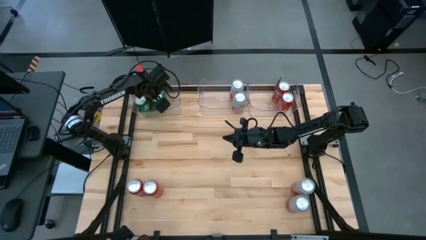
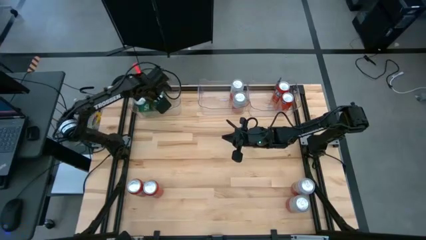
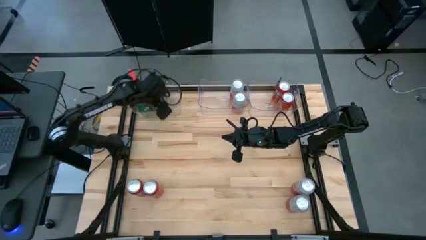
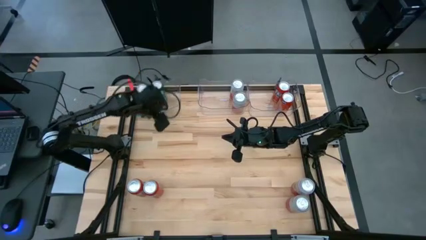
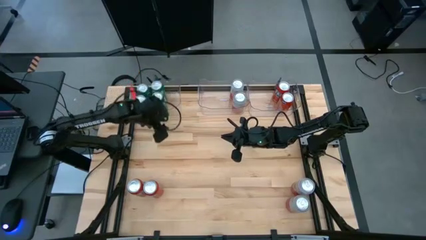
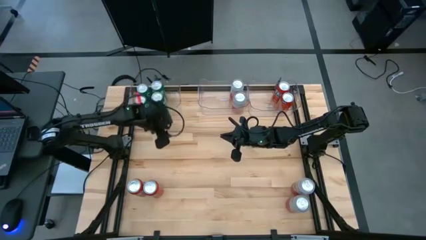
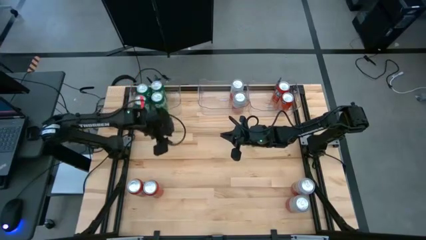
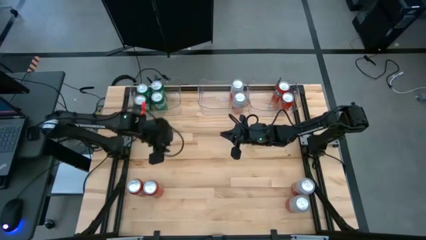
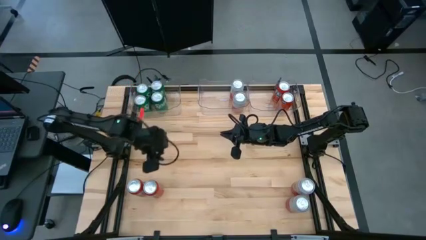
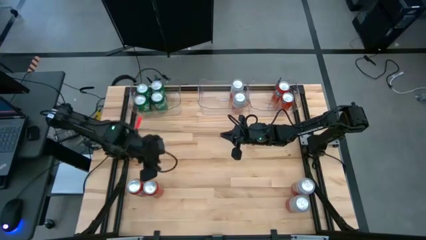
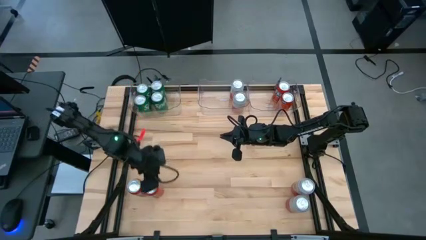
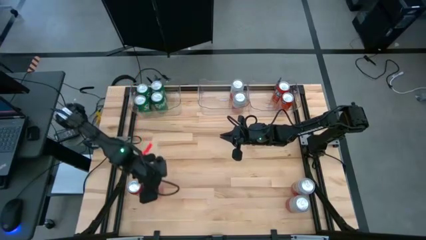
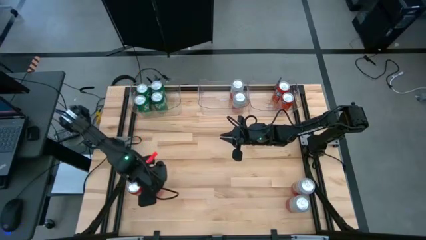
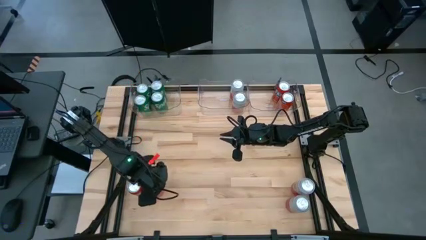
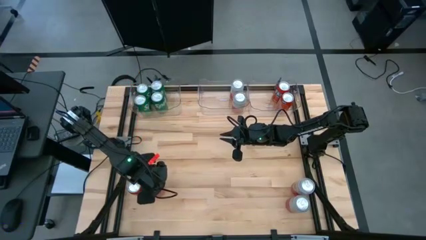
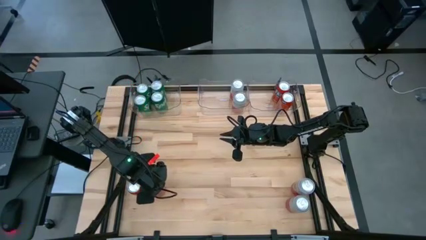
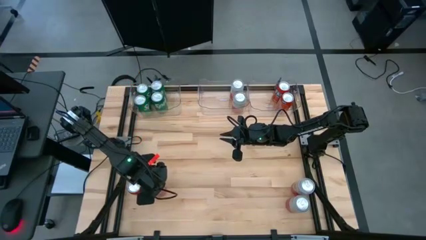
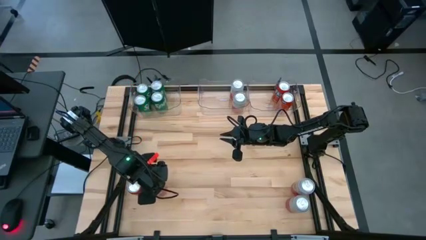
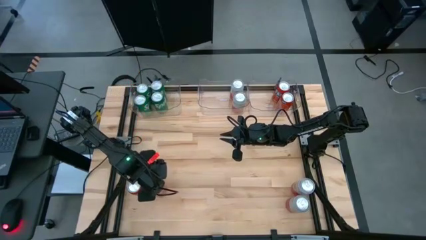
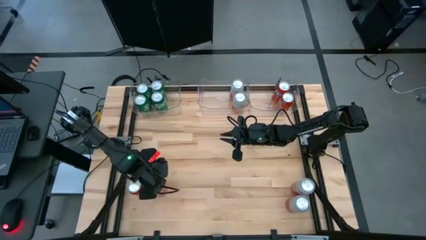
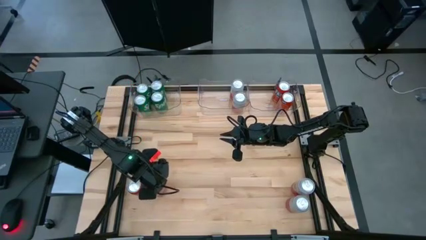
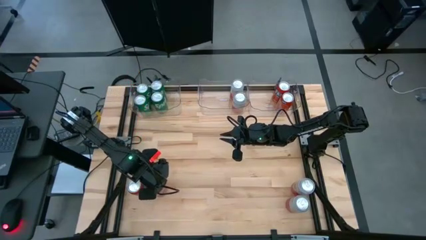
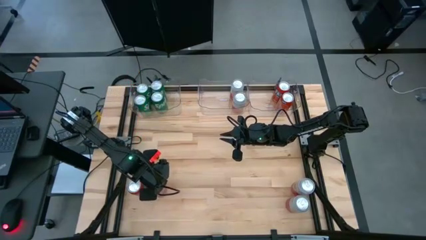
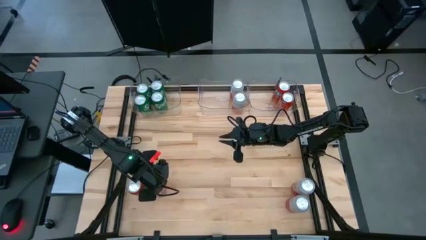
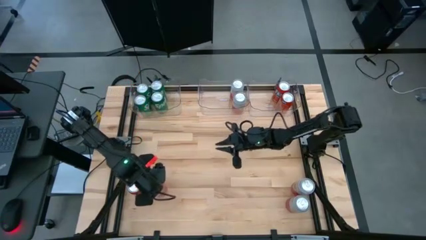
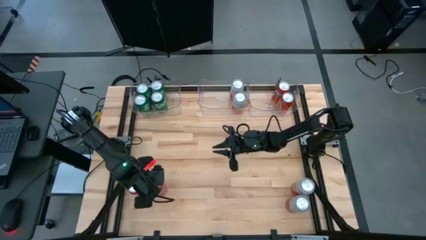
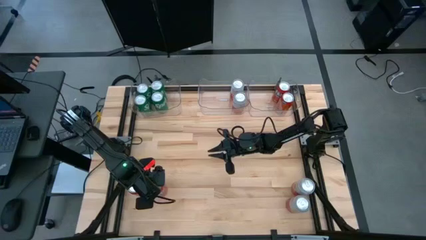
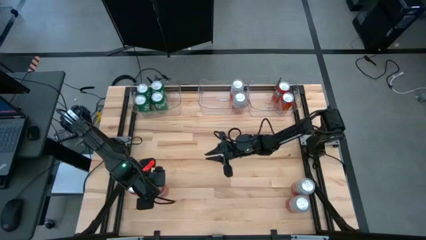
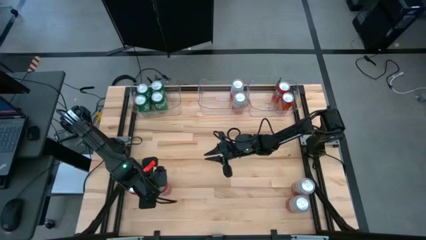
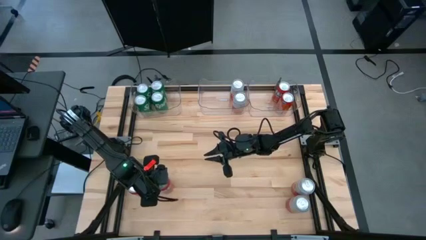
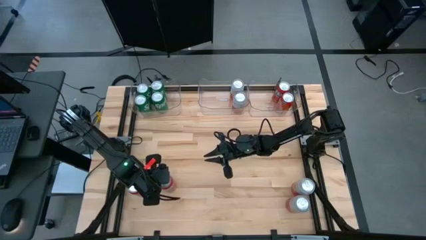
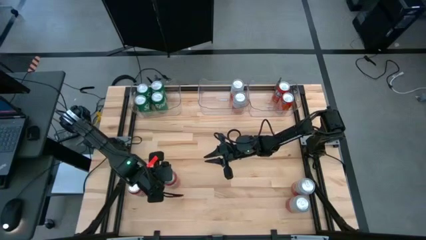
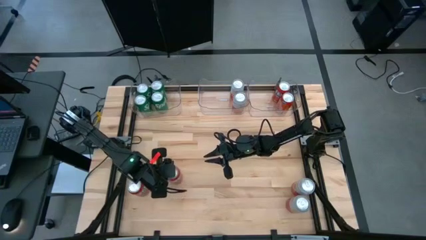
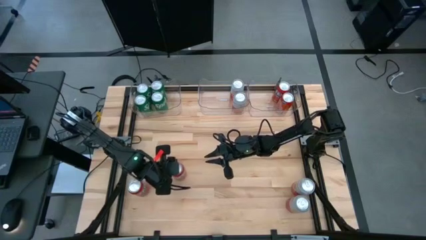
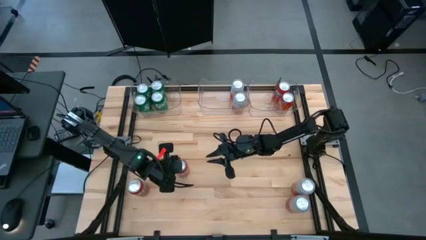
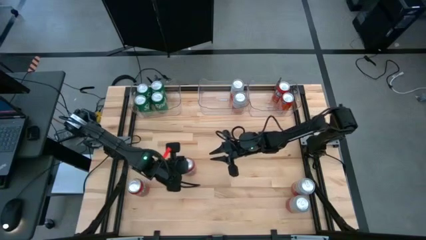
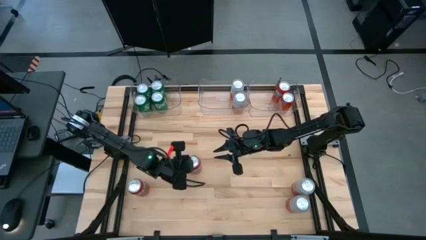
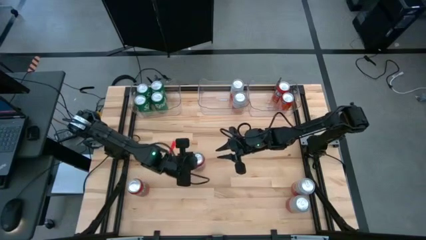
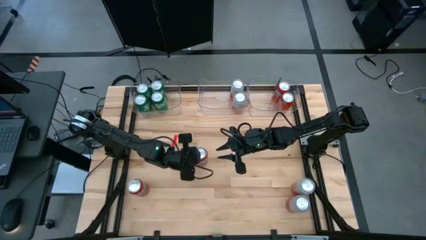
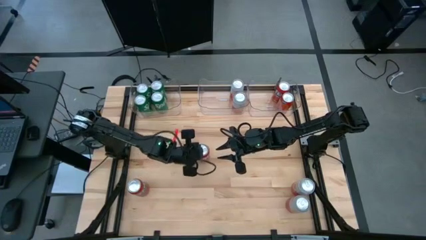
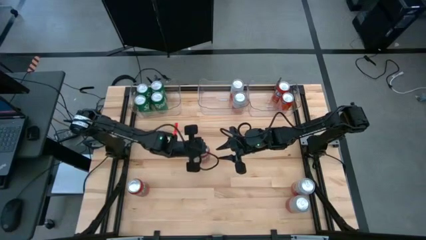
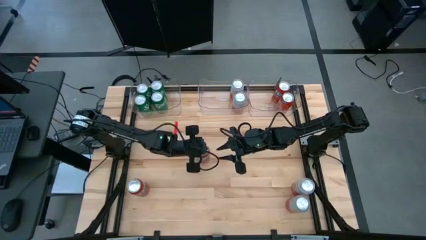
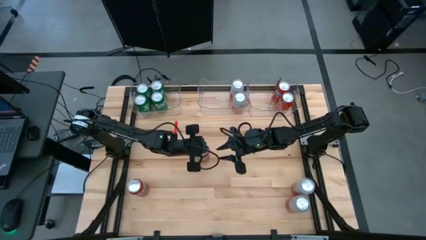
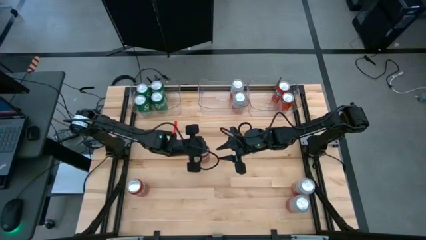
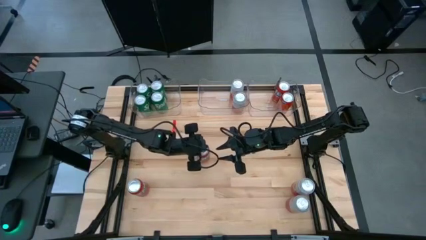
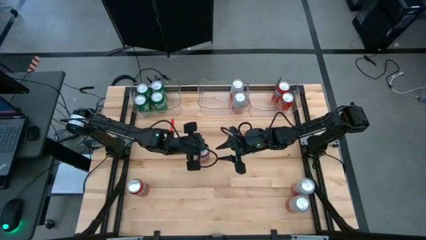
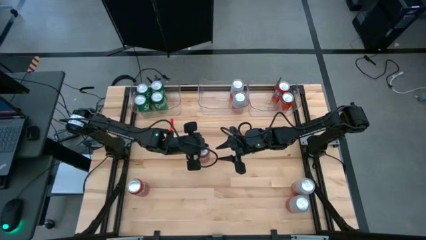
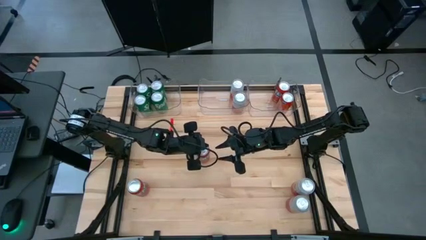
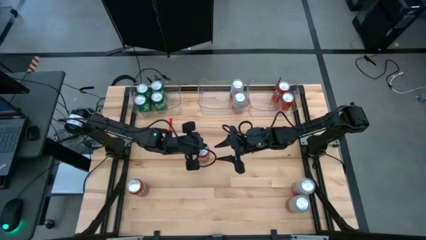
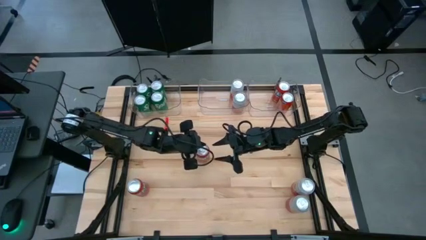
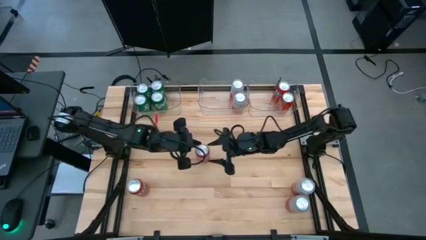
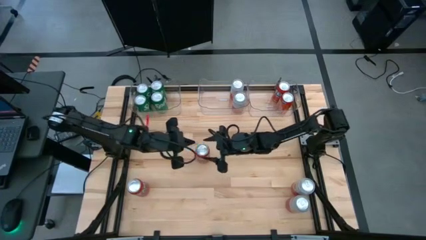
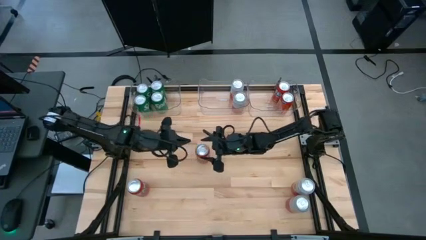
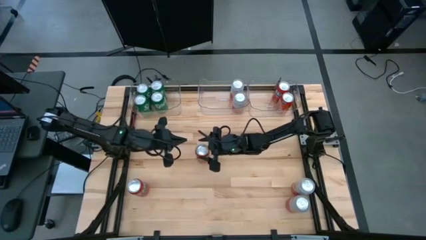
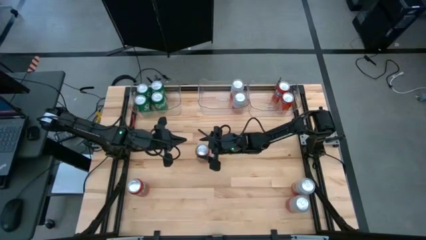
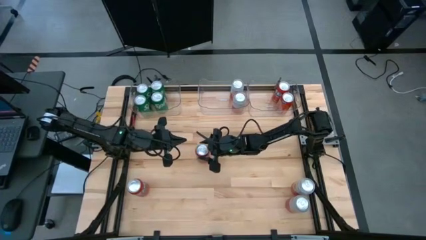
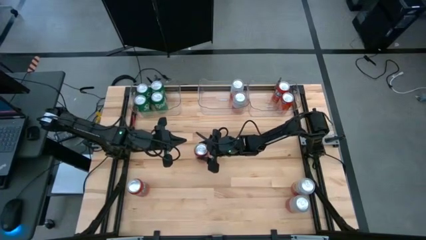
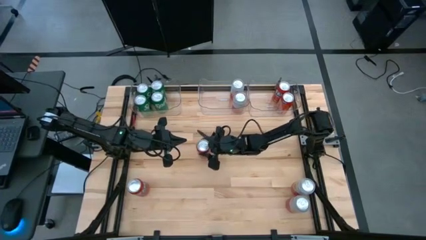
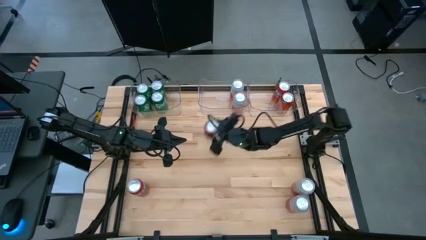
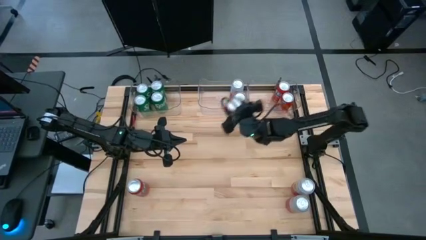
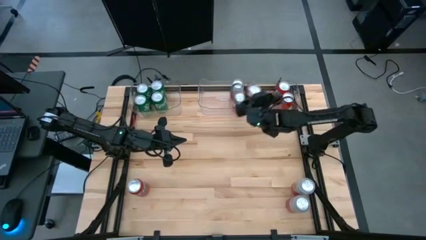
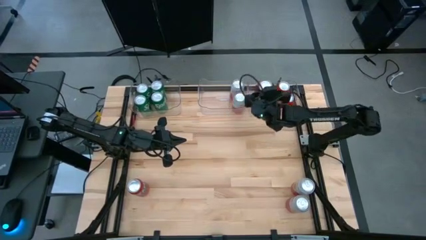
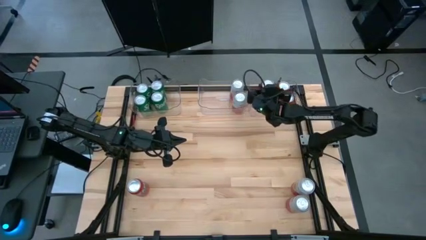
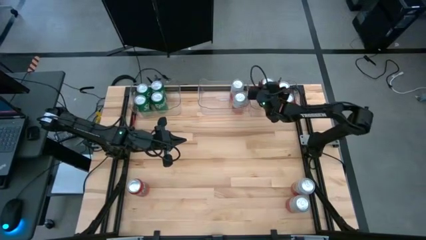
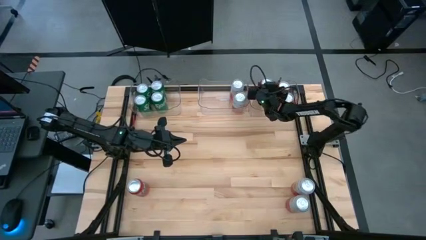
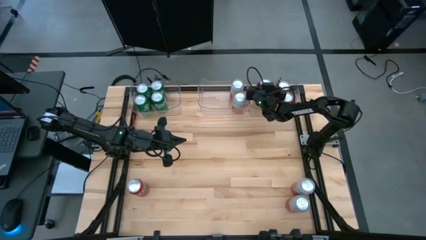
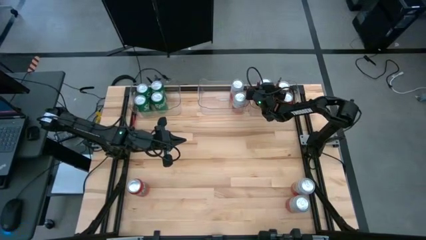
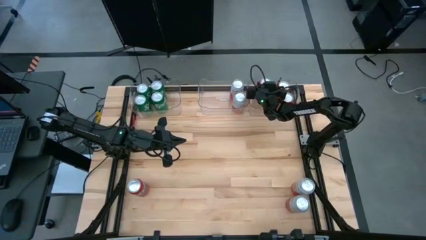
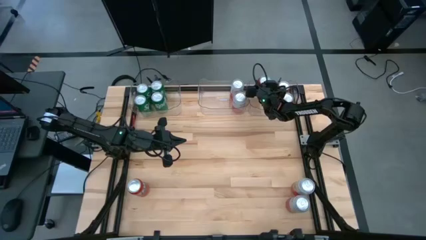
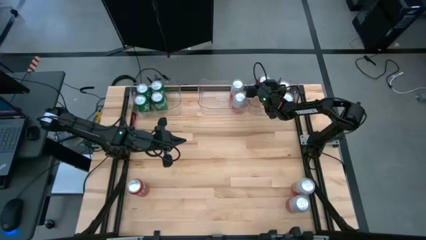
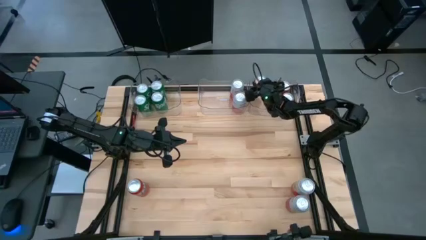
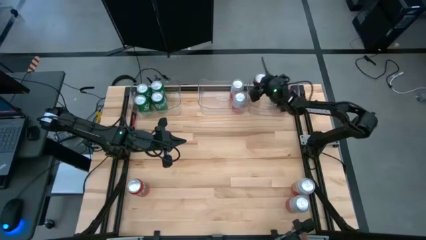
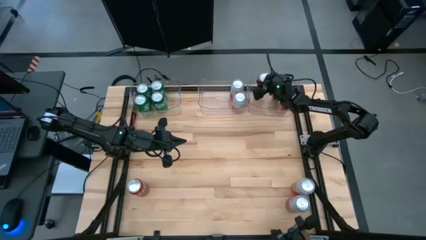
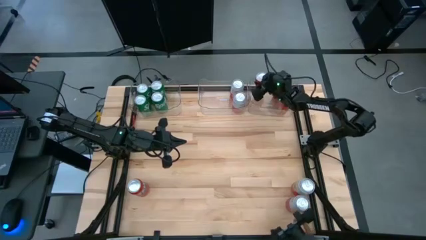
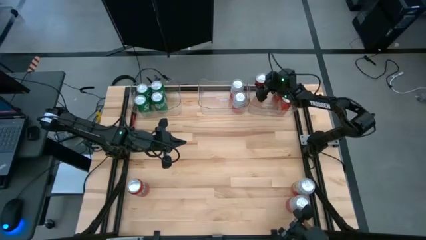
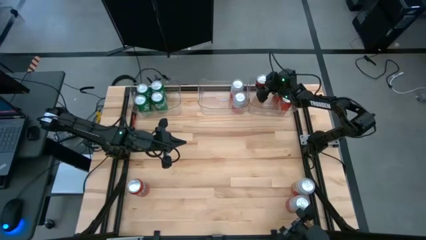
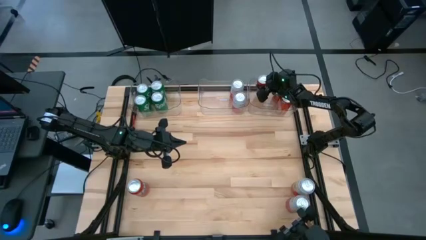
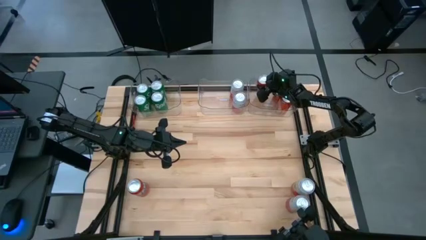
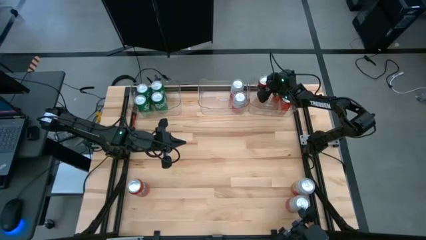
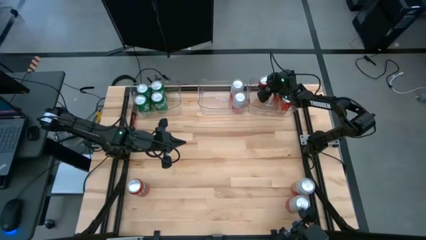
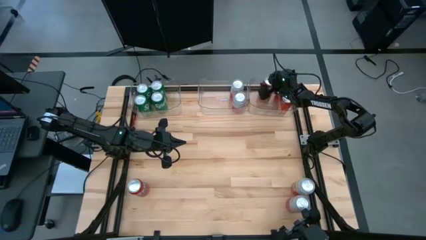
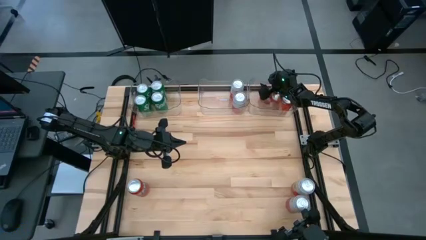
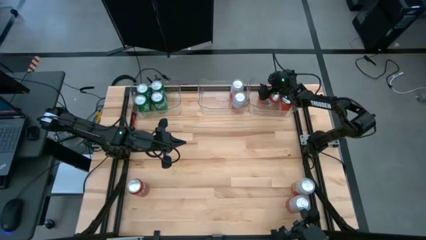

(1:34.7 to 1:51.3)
Task: Sort soda cans
Put the red soda can into the right transparent bin
